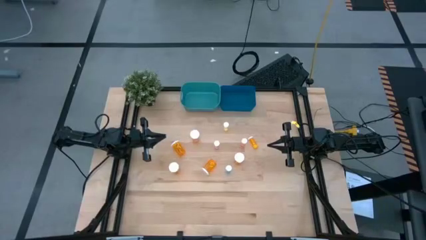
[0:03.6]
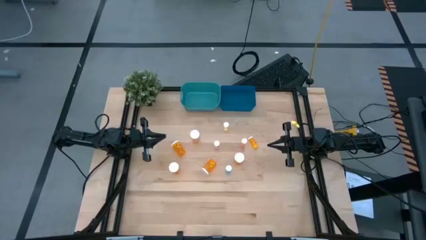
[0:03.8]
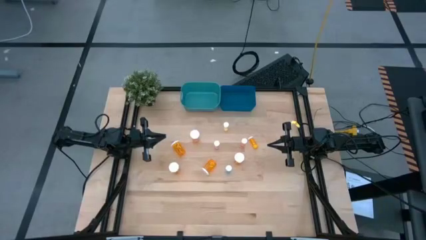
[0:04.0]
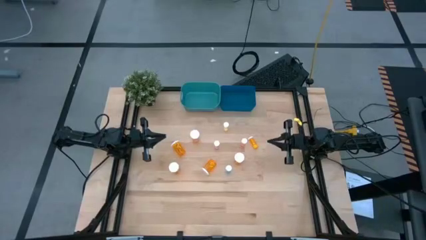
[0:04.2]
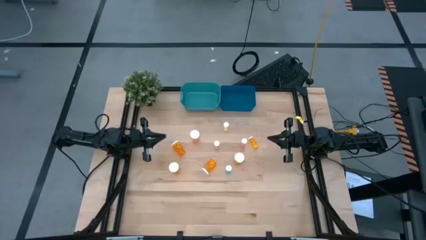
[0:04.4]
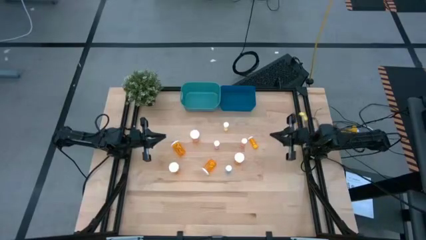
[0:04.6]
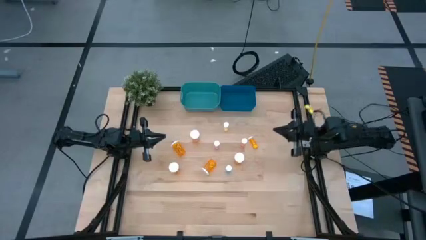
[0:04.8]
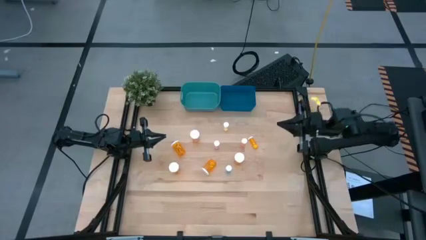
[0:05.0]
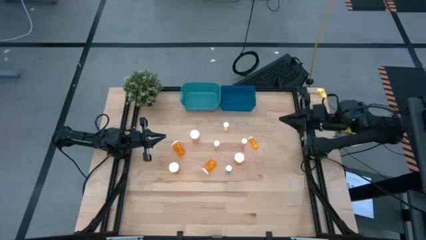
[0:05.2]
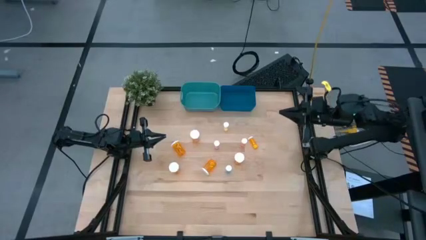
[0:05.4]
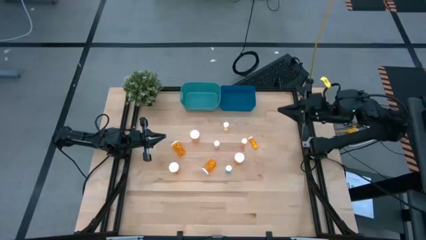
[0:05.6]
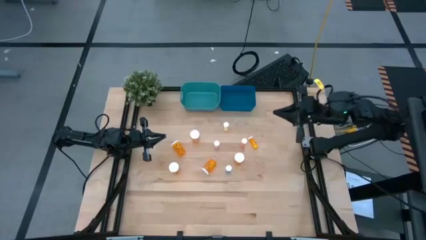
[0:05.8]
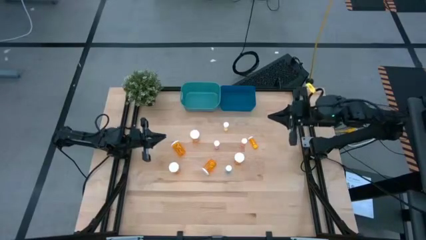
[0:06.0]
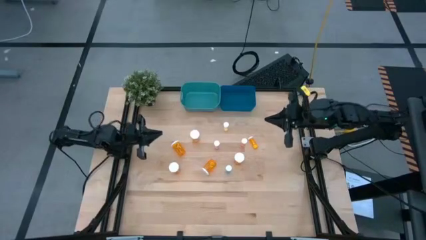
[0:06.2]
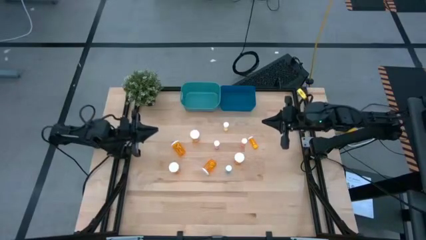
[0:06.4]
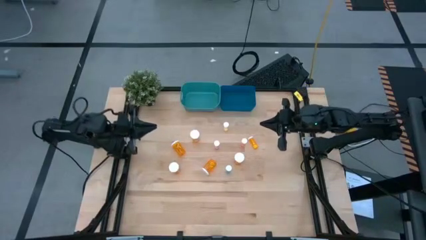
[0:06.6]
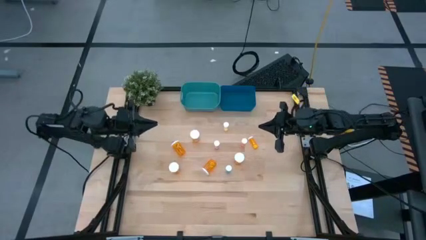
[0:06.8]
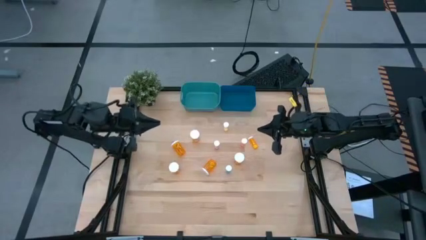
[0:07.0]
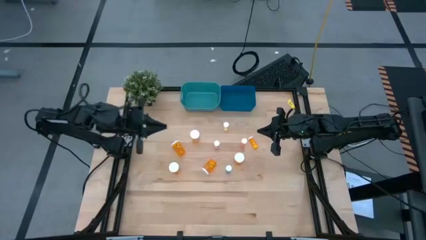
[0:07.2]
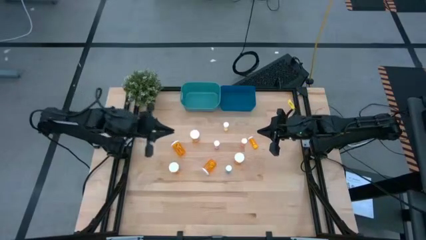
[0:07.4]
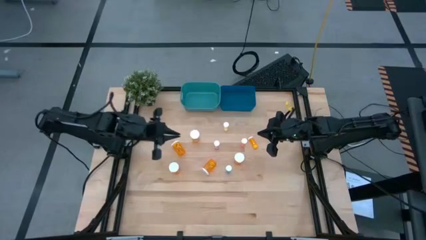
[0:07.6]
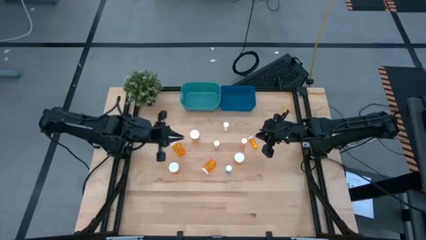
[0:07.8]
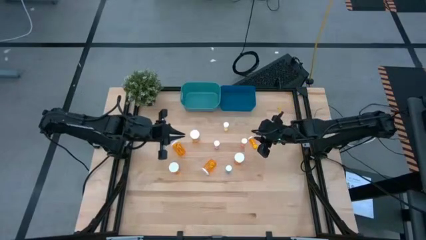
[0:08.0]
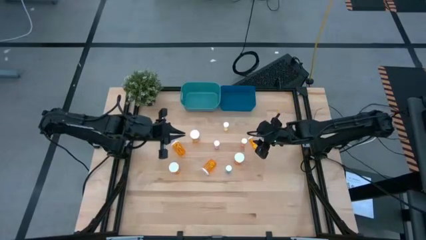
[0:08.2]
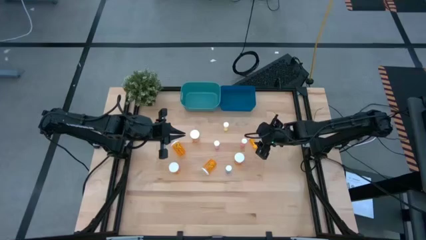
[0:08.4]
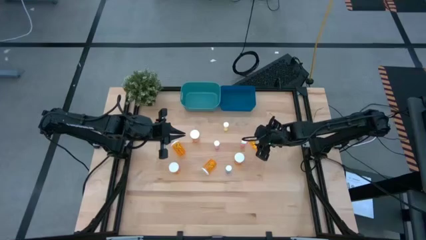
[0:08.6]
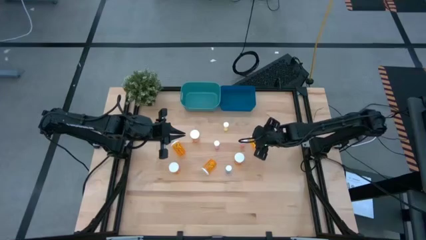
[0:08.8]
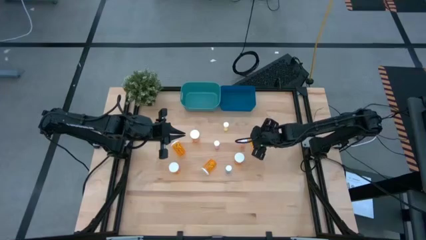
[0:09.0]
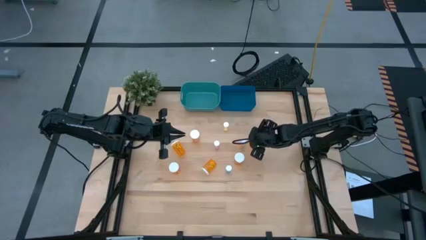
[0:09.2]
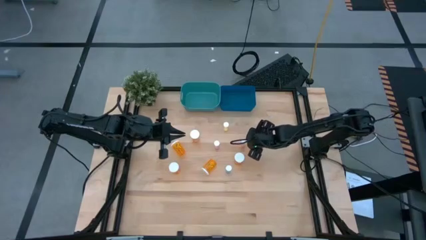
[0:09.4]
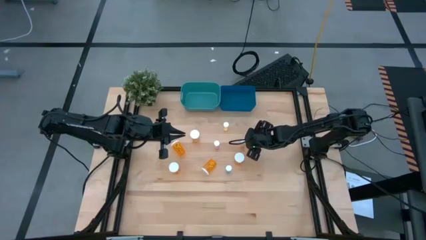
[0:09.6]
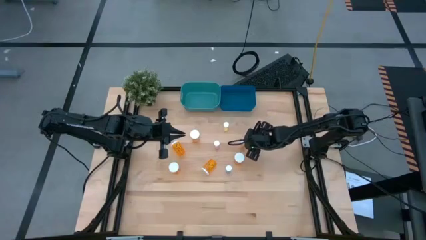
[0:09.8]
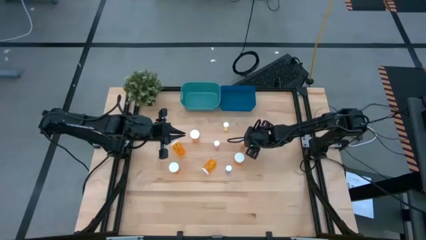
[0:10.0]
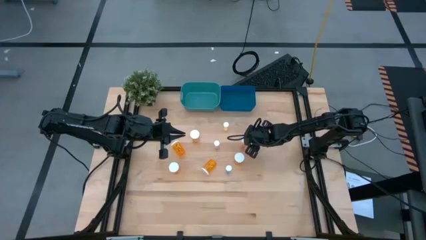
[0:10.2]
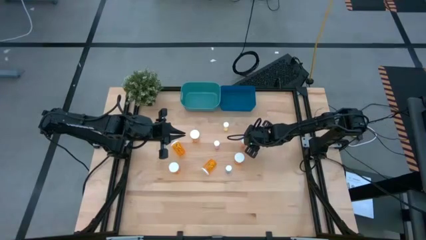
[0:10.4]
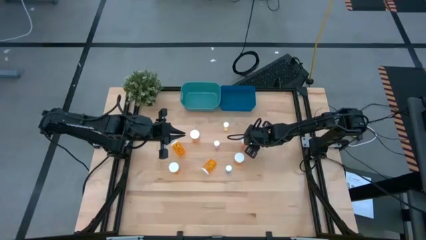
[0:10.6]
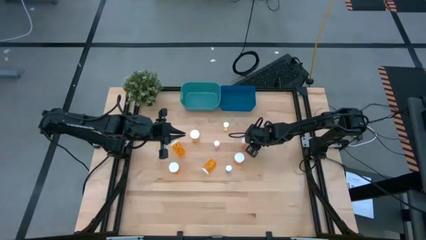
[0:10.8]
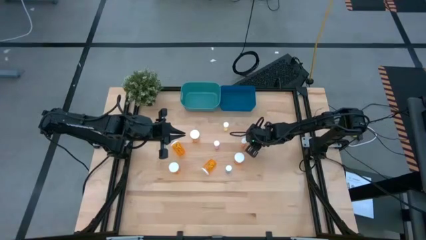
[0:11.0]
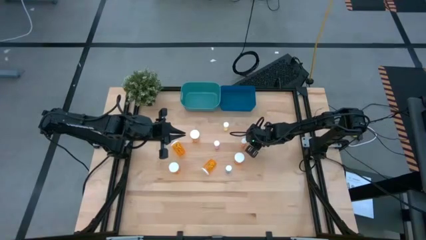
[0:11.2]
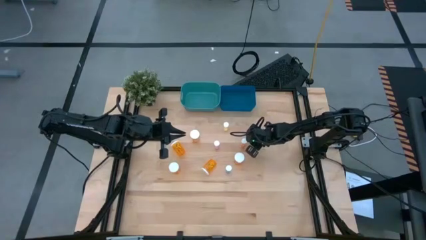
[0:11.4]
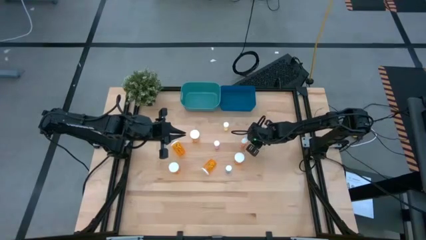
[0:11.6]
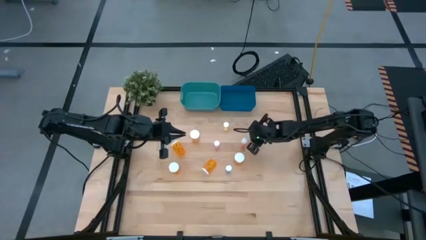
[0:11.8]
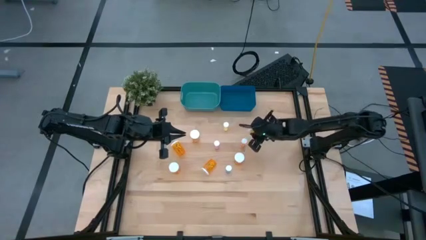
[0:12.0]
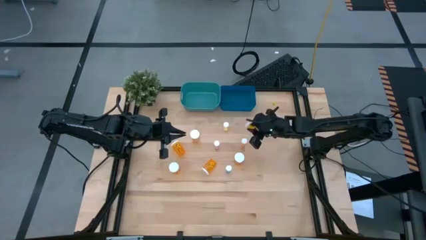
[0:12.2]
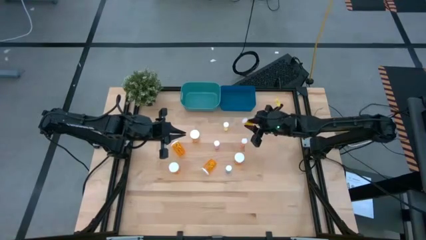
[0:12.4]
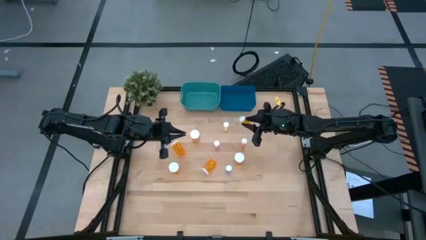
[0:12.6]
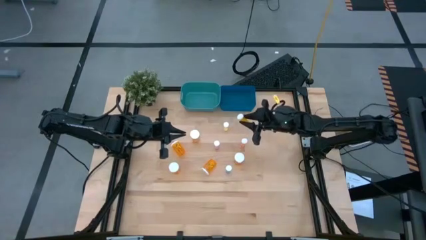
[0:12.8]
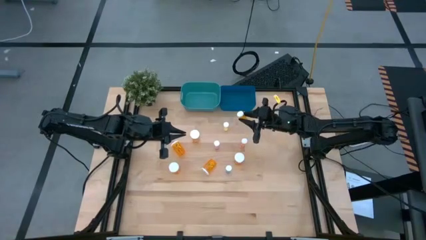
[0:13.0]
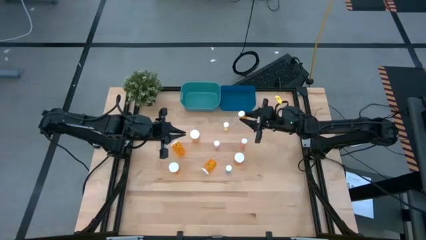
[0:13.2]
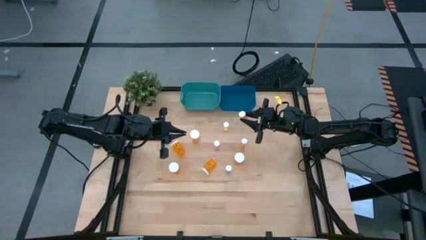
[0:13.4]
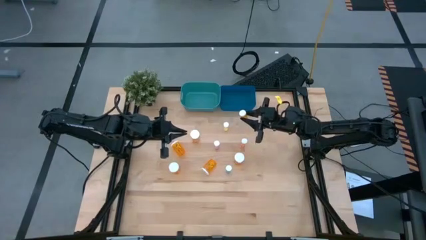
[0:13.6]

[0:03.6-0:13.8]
Task: Pick and place medicine bottles into bin by pill shape (circle, oval)
Put the small orange tablet bottle into the blue bin
